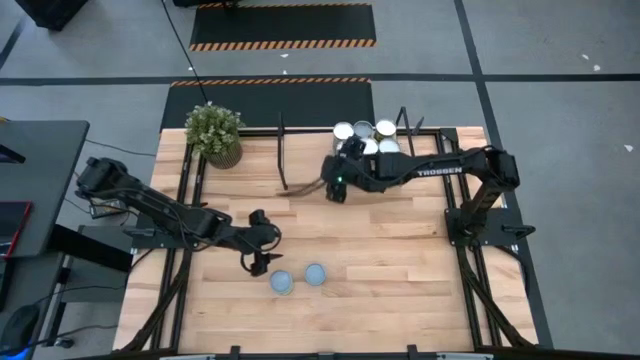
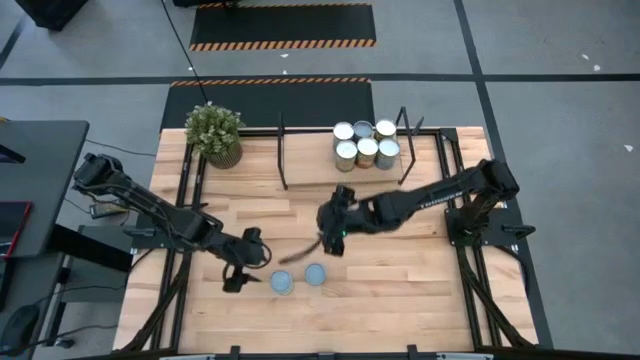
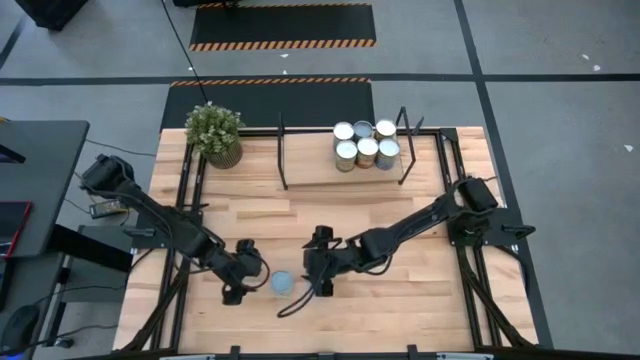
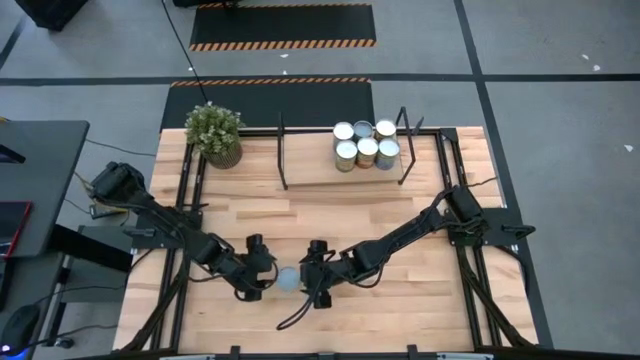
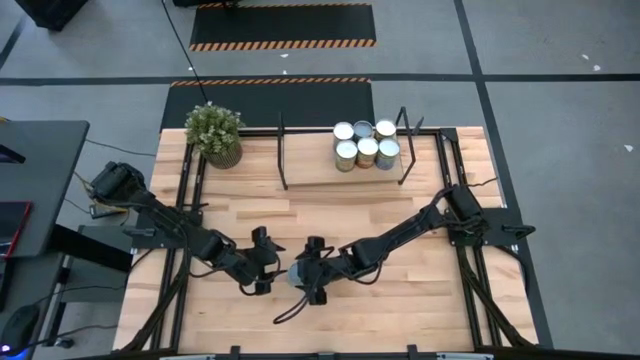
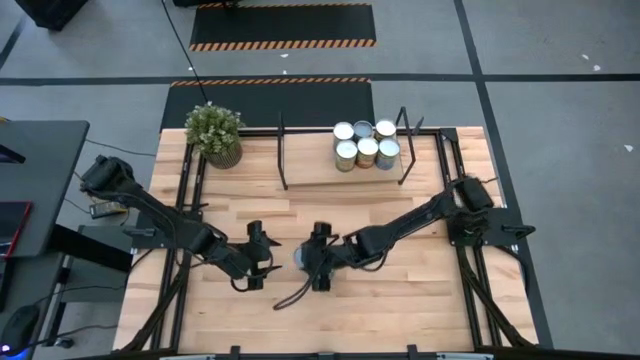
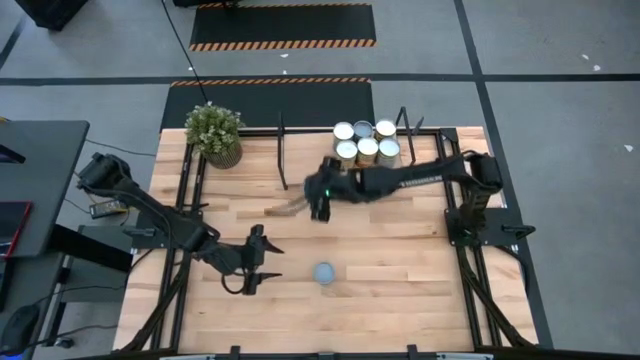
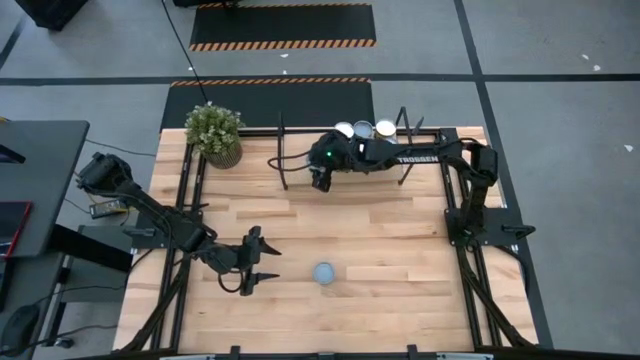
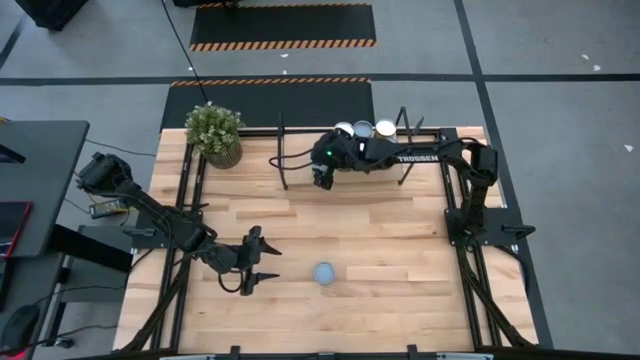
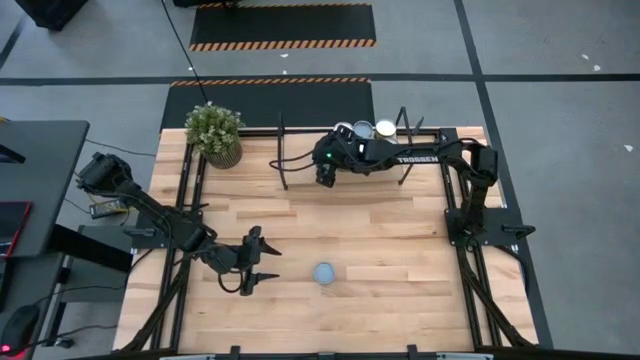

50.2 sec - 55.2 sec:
Task: Pick and place cans onto a shelf
Put the canned spaghetti sauce on the shelf

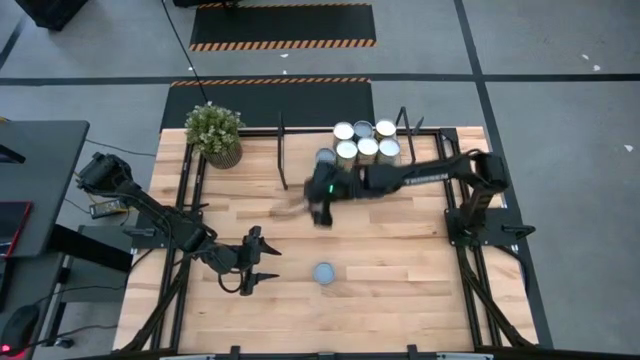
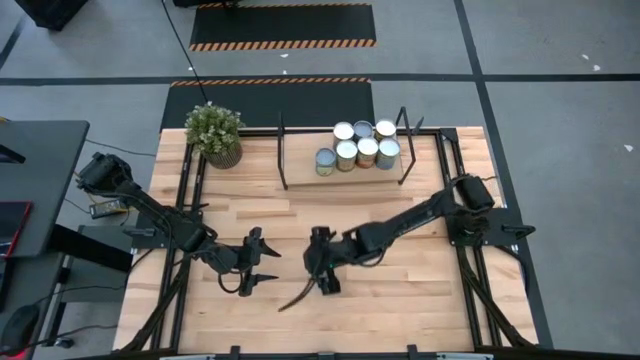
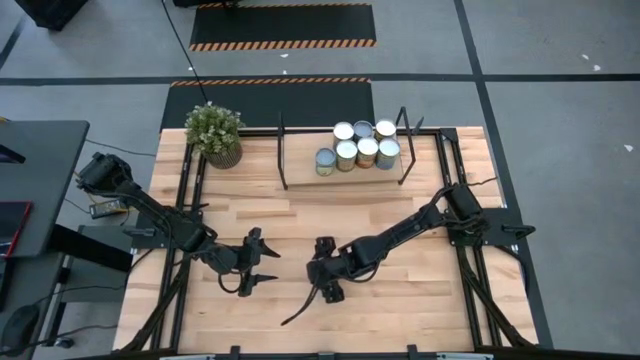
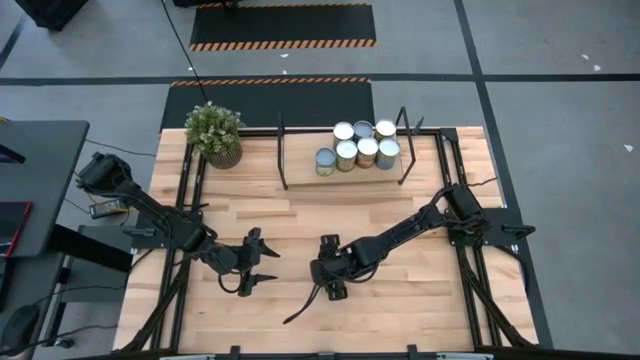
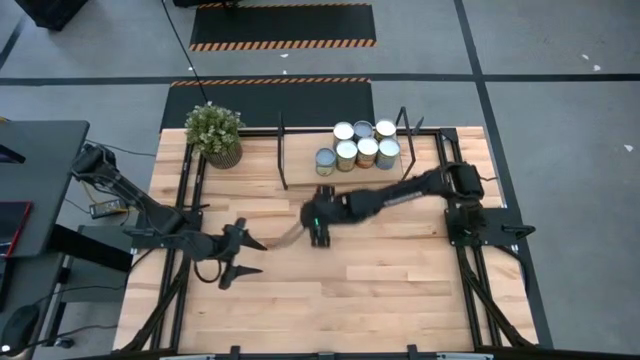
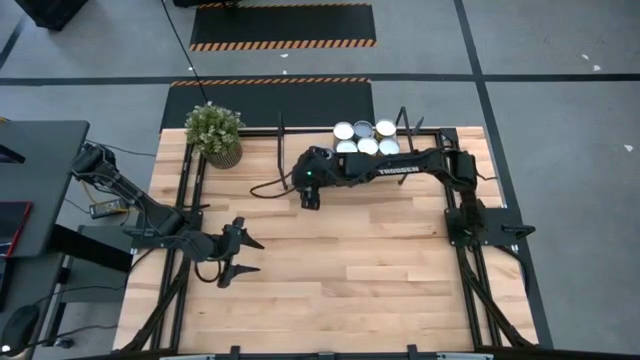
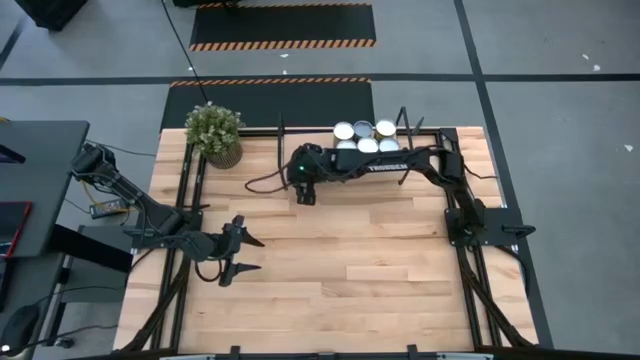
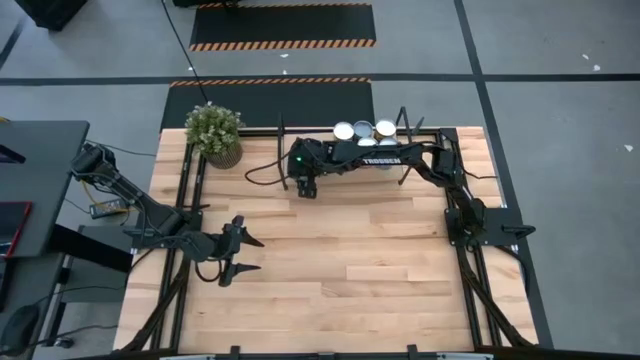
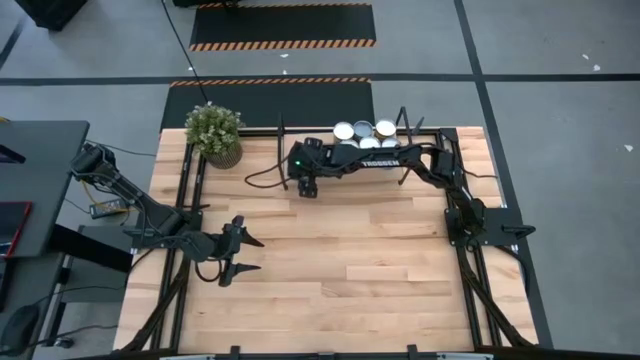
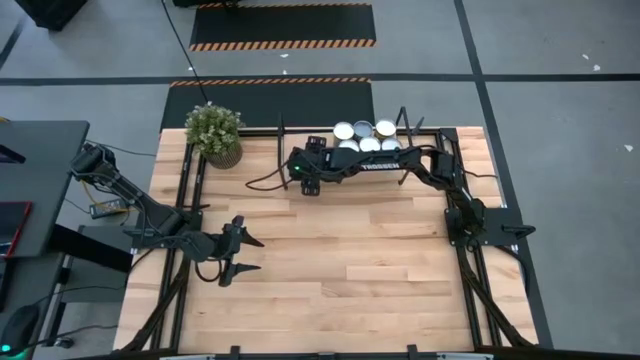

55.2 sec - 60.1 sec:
Put the canned tuna on the shelf

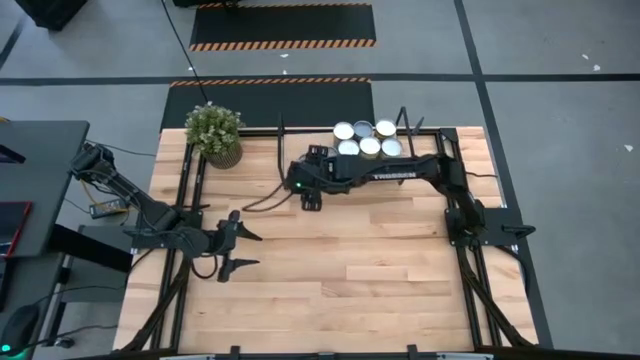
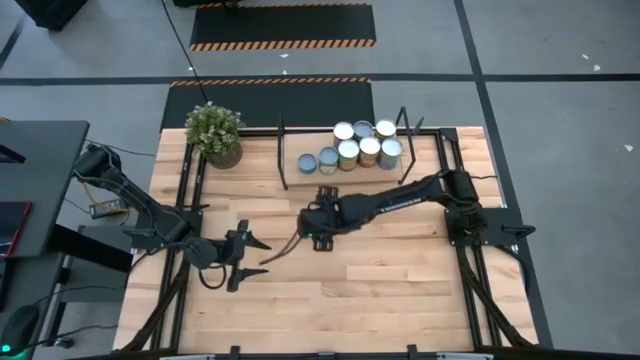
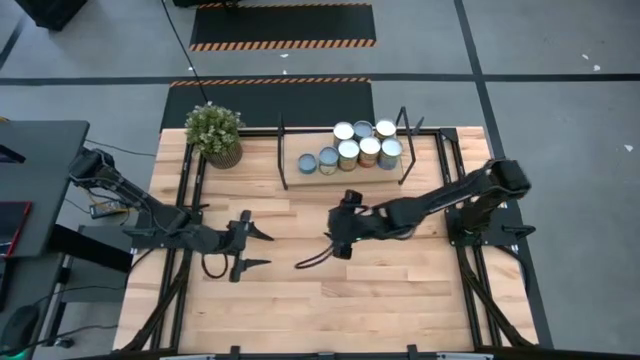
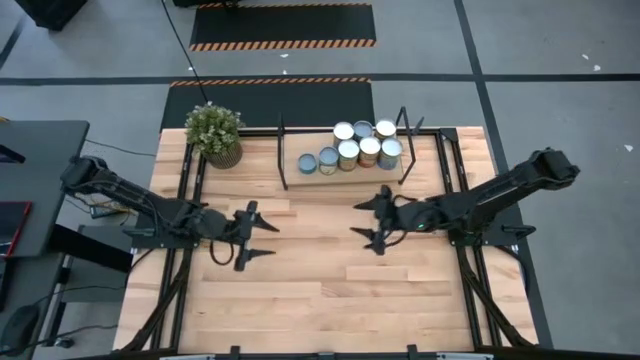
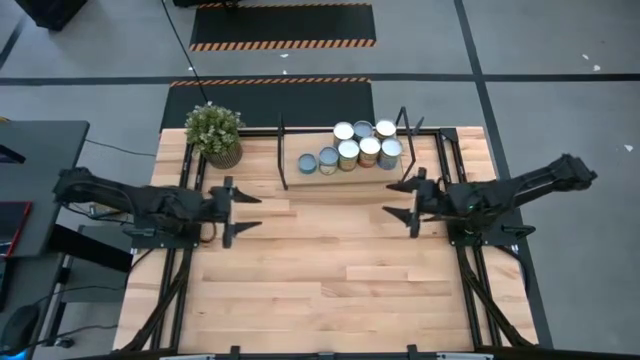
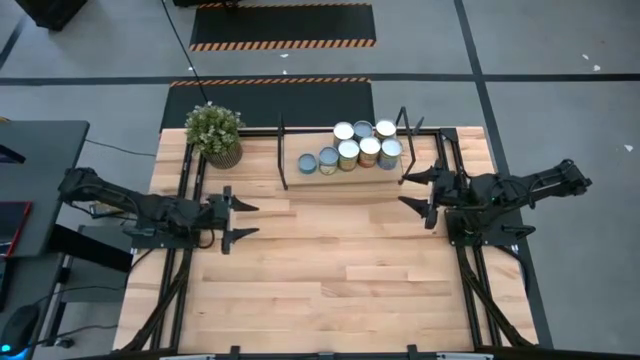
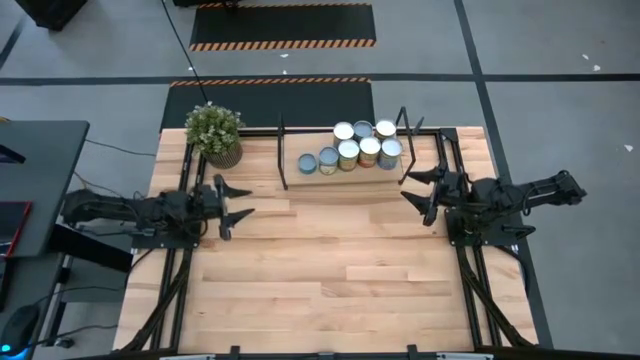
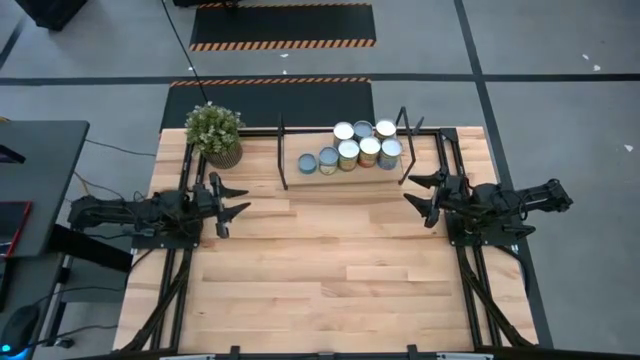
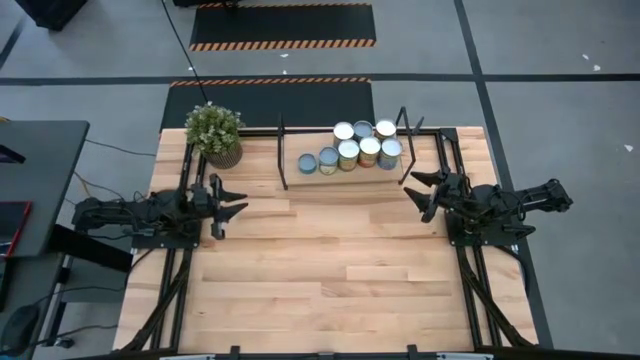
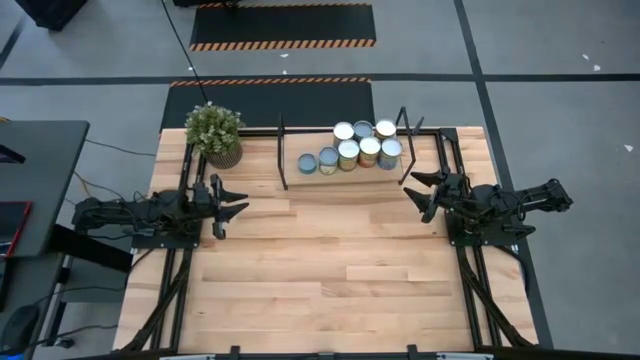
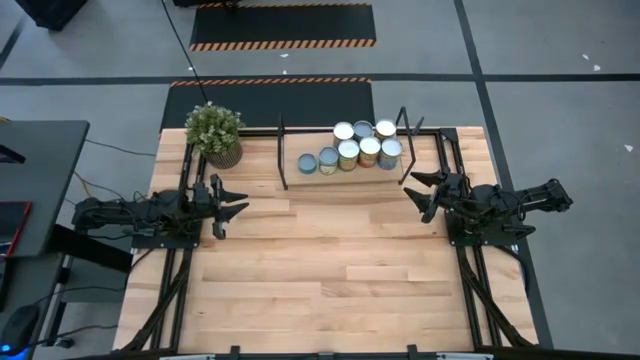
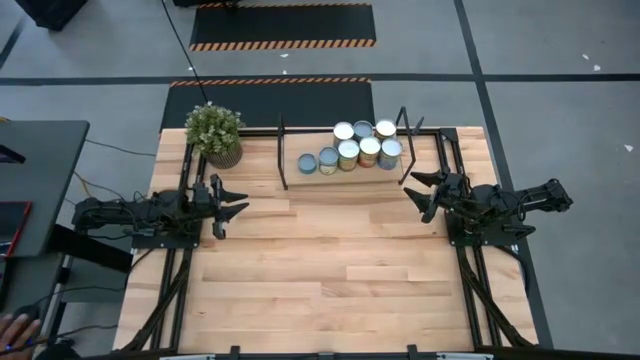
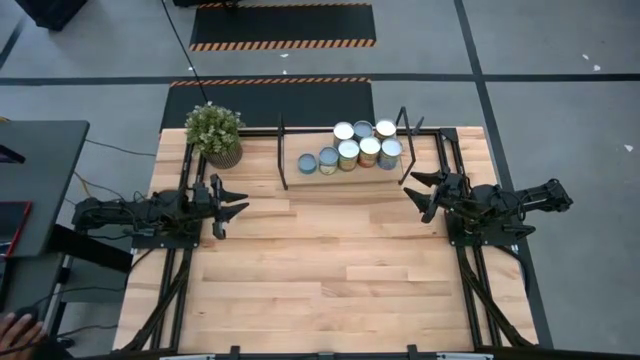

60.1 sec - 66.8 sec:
Return to Home Position

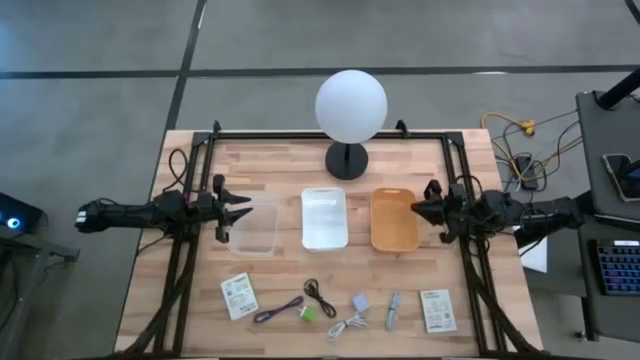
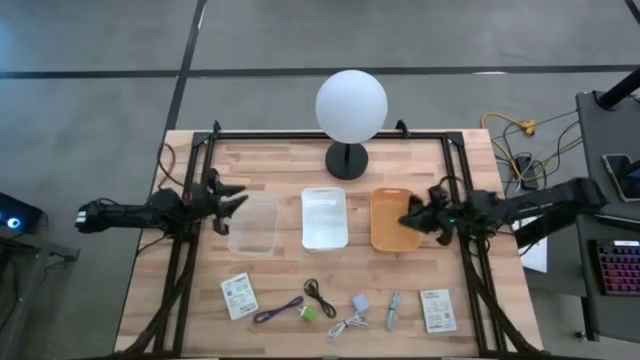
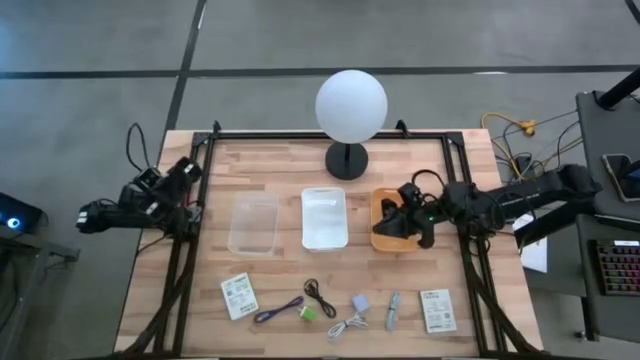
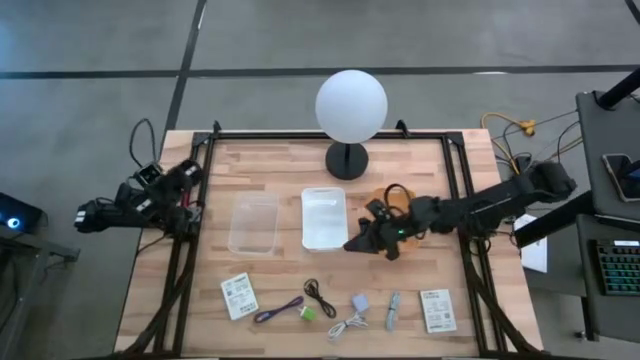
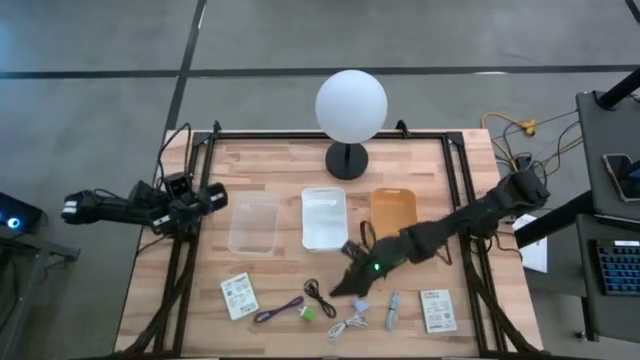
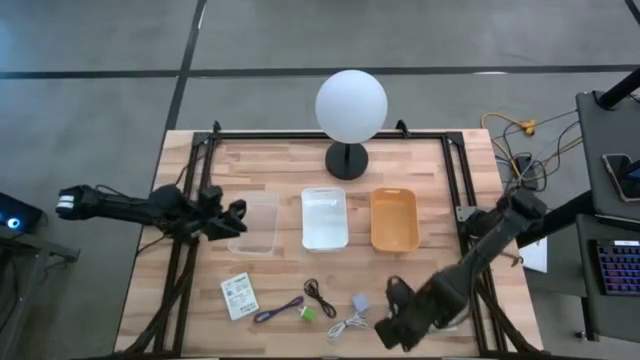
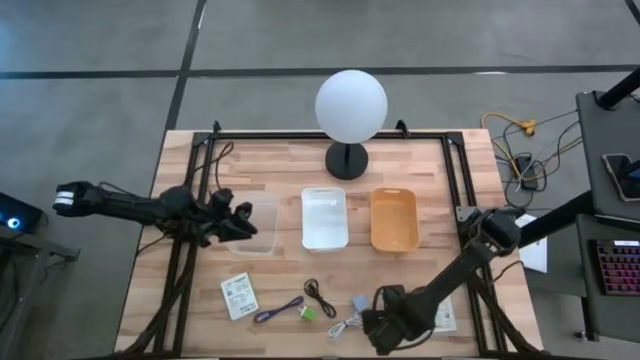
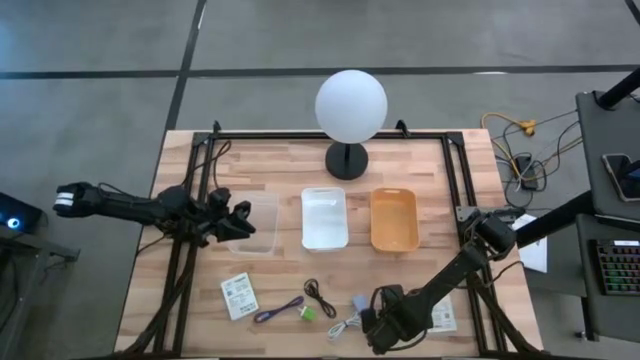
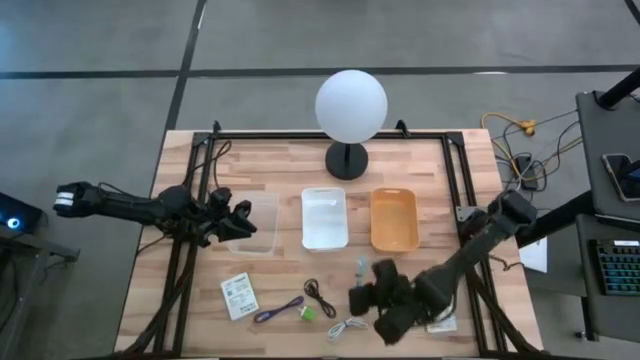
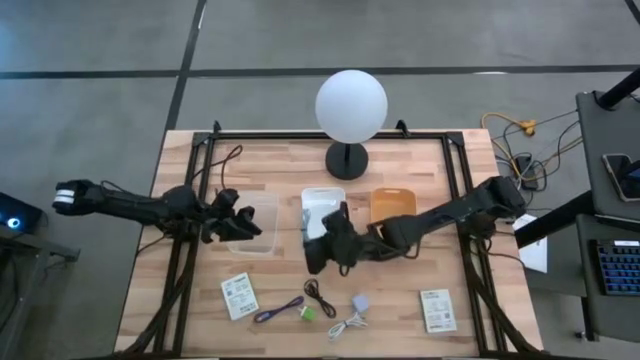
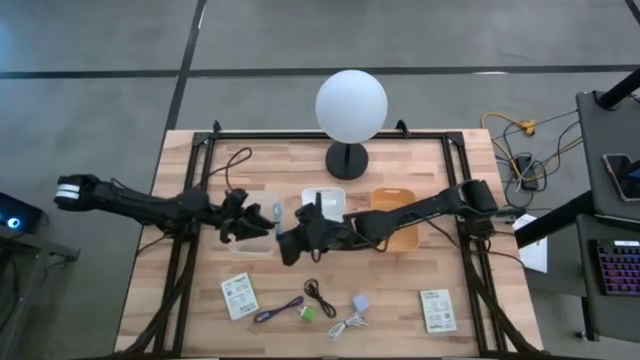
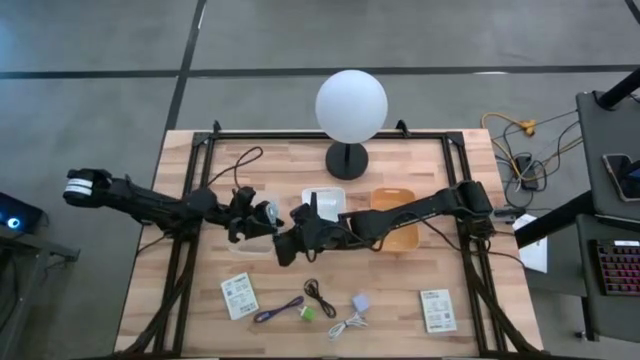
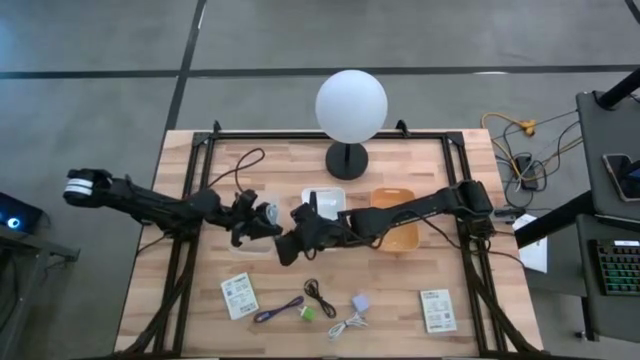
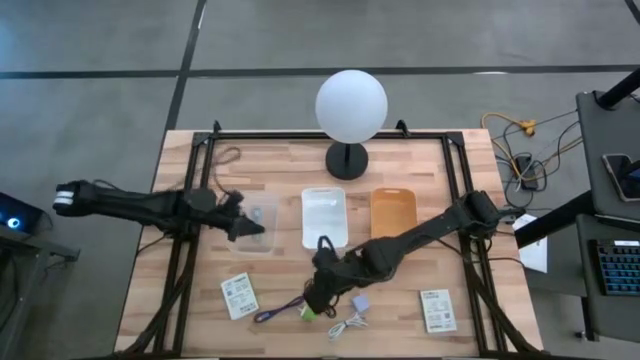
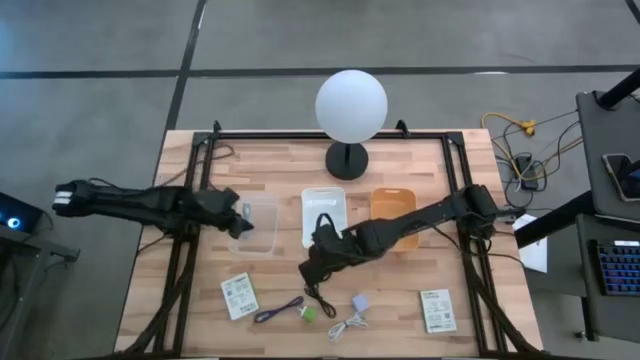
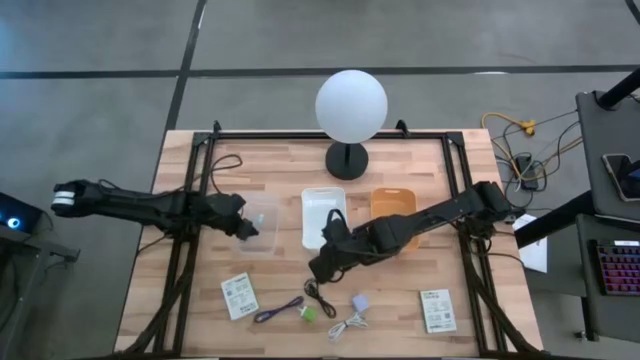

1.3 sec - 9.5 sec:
Task: Pick and place items into bin
Put the gray charger cable into the transparent bin
